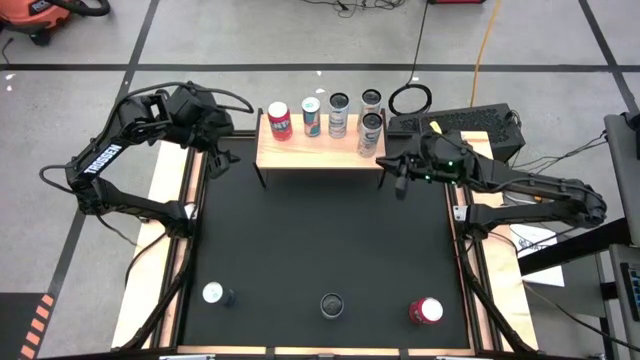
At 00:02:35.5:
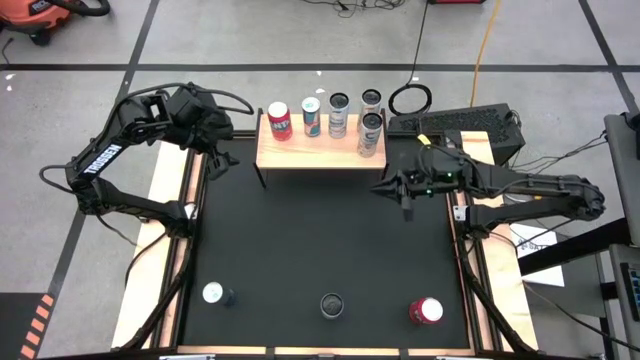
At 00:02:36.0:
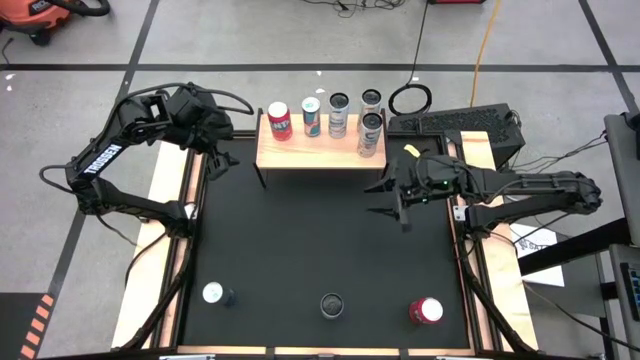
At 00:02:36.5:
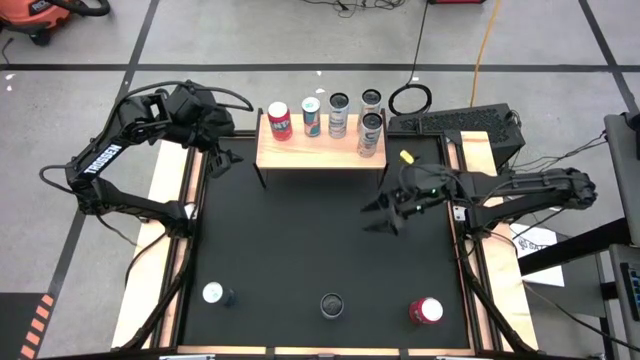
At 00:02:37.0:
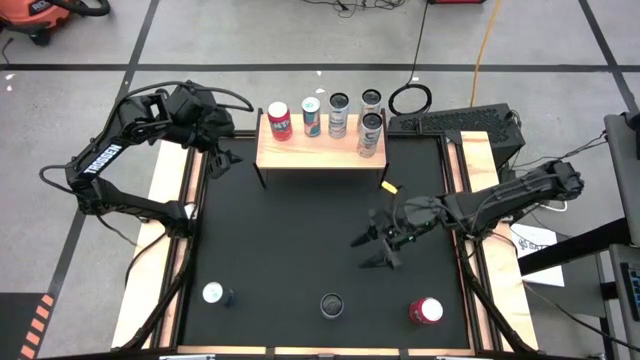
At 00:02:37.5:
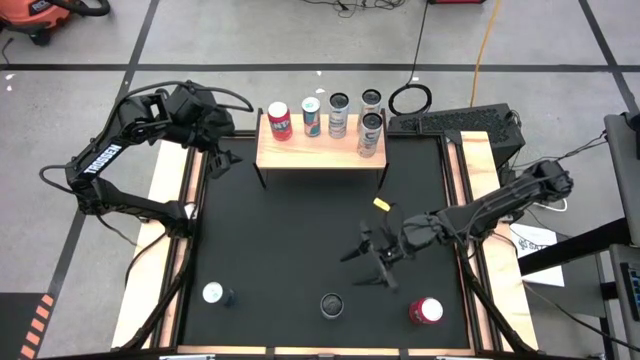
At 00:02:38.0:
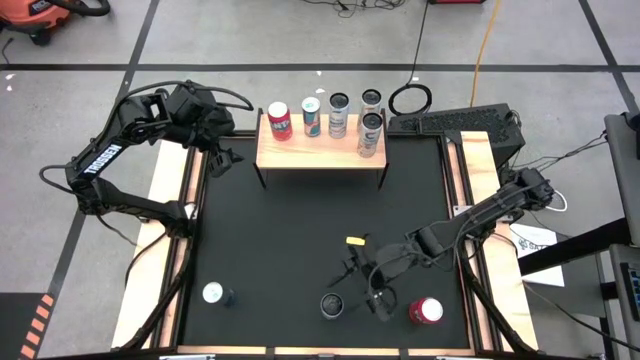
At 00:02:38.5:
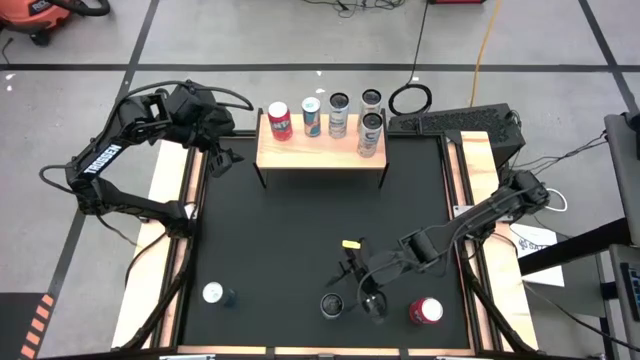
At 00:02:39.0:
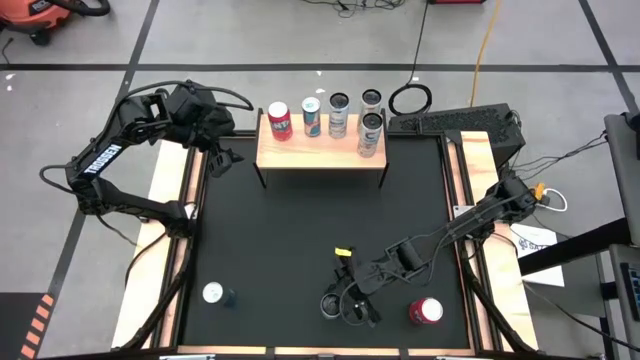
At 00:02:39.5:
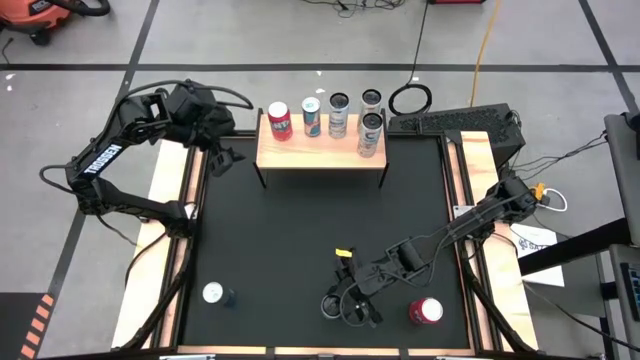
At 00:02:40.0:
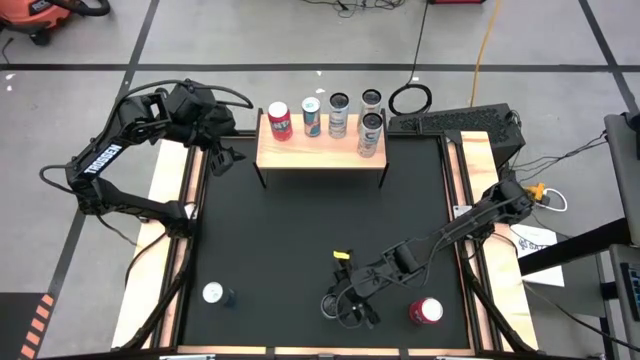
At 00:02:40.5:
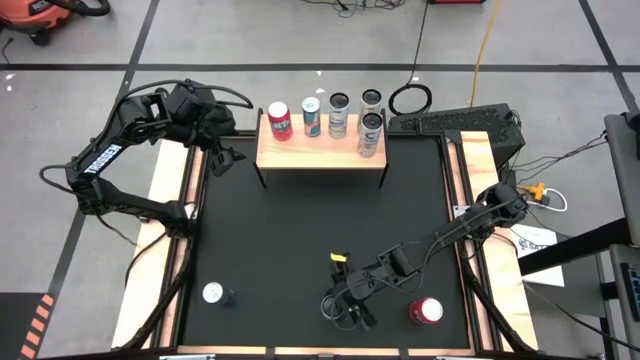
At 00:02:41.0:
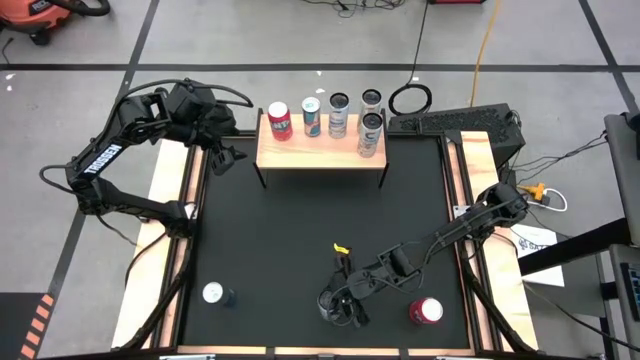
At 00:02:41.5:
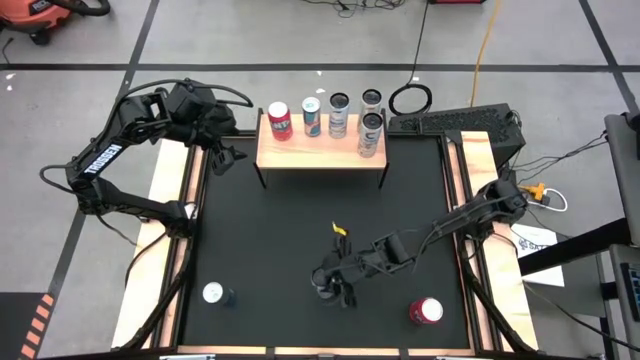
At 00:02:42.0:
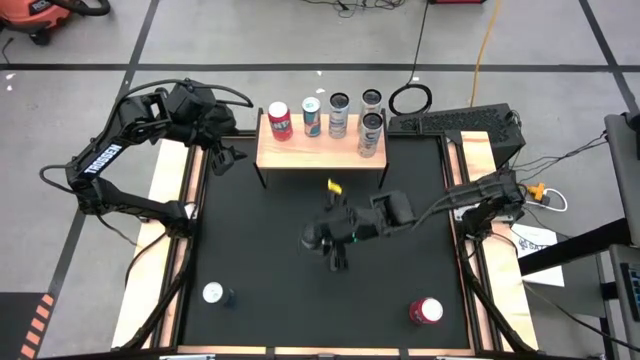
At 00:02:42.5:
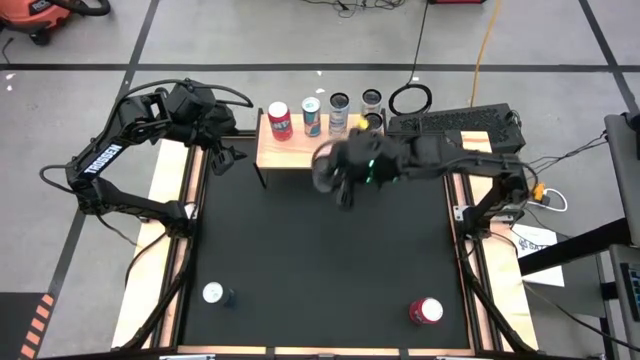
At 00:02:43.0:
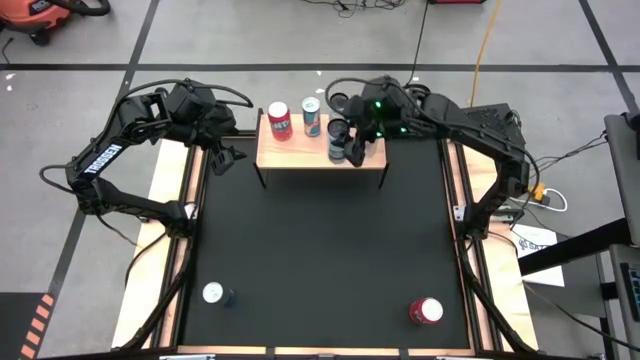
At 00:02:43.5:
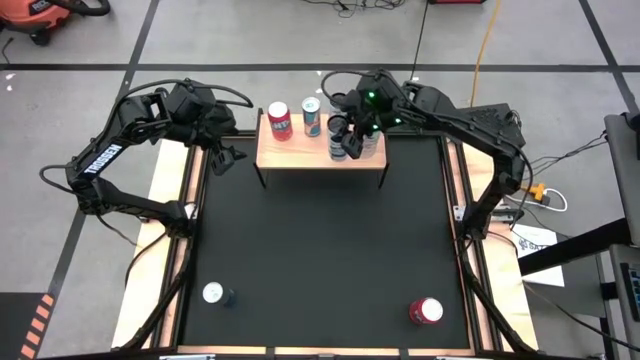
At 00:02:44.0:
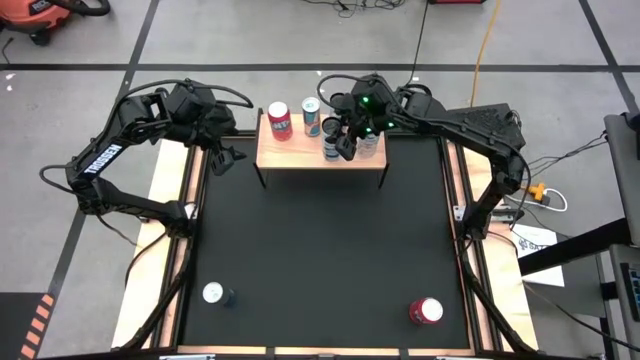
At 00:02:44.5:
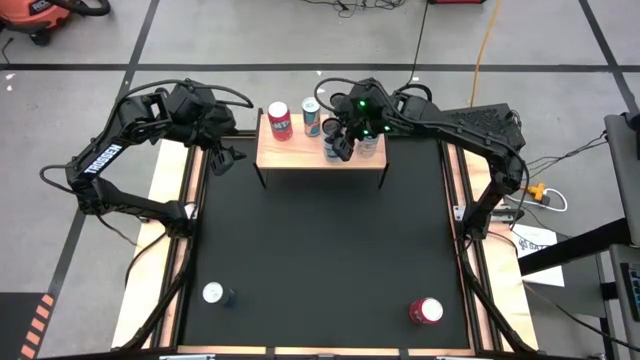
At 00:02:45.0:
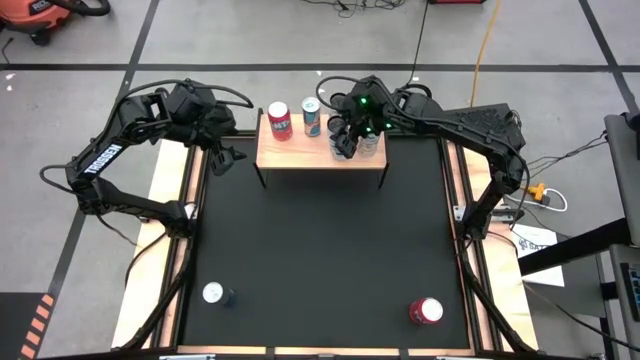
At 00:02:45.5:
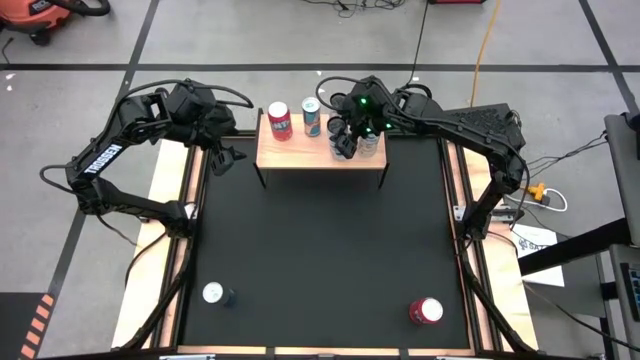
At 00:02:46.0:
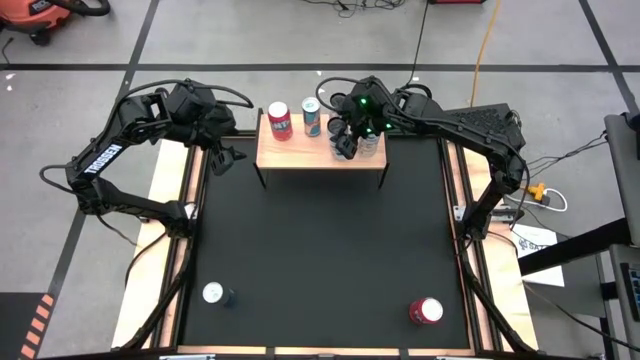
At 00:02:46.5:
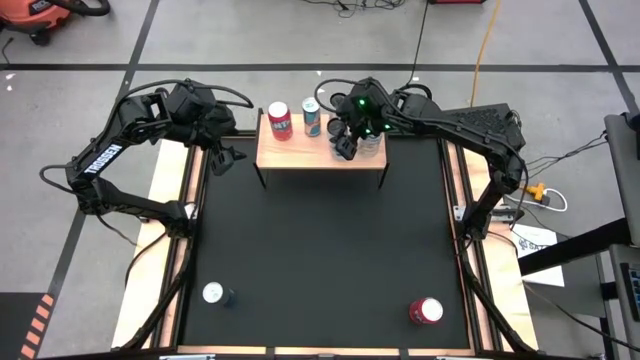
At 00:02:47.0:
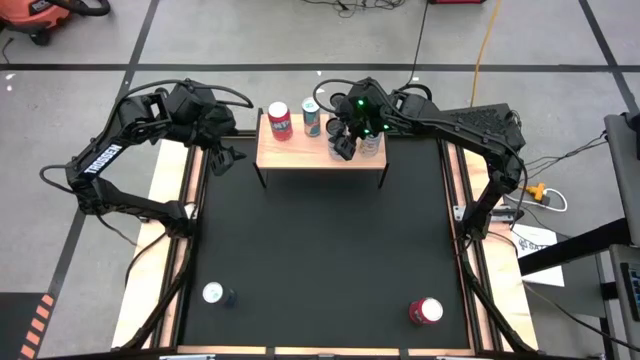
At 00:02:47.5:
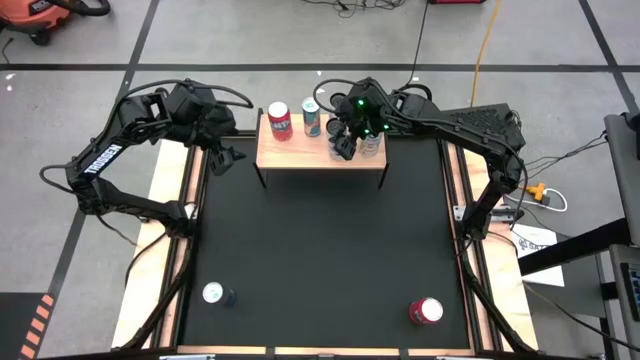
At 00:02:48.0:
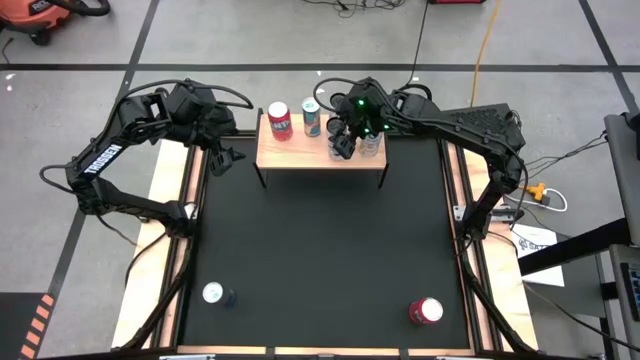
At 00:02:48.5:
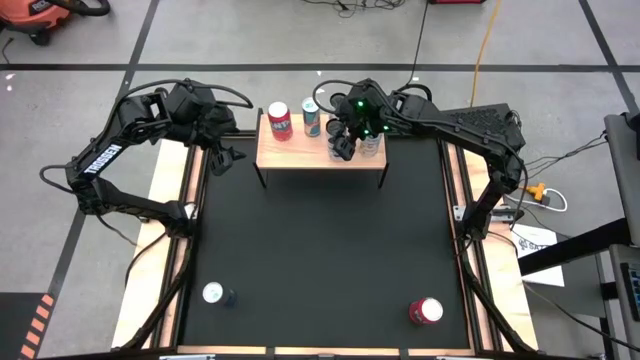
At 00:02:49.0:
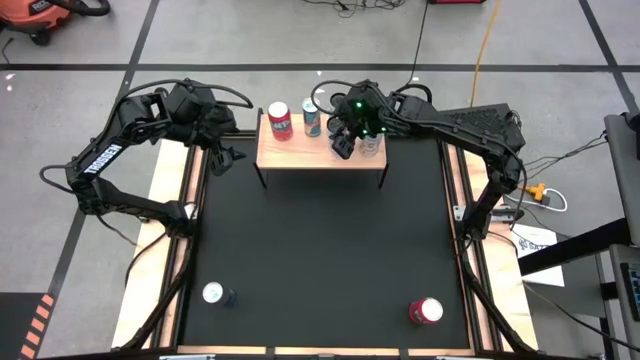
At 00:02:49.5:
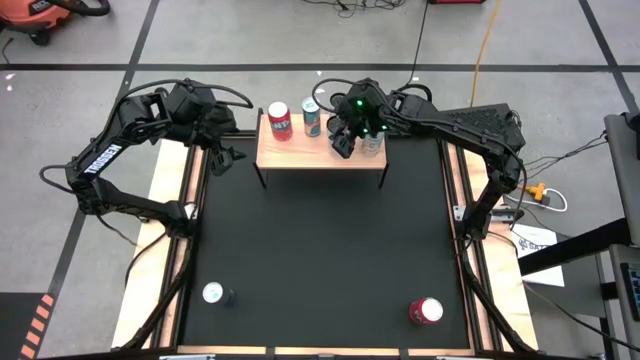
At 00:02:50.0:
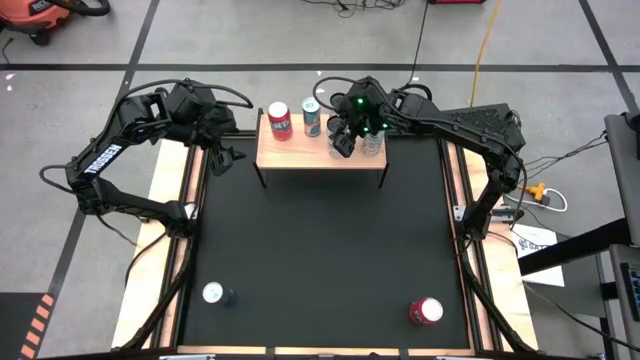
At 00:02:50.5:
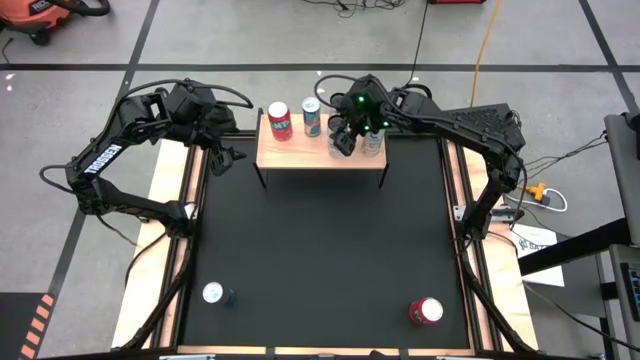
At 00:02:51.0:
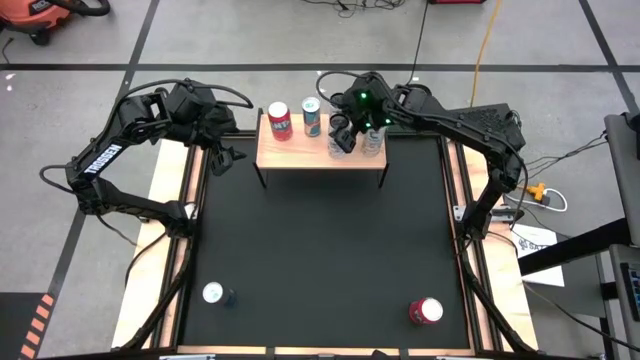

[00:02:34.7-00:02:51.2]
Task: Place canned beverage on shelf
Put the white-blue soda can on the shelf aligned with the other white-blue soda can

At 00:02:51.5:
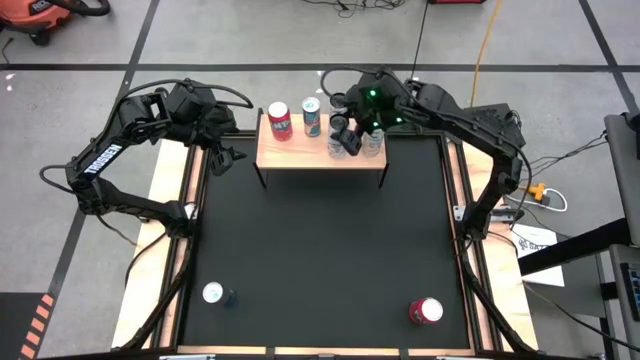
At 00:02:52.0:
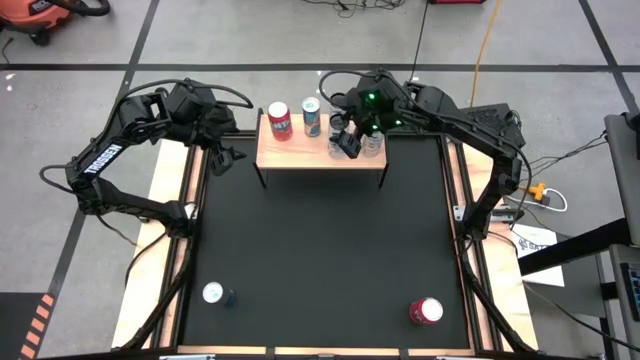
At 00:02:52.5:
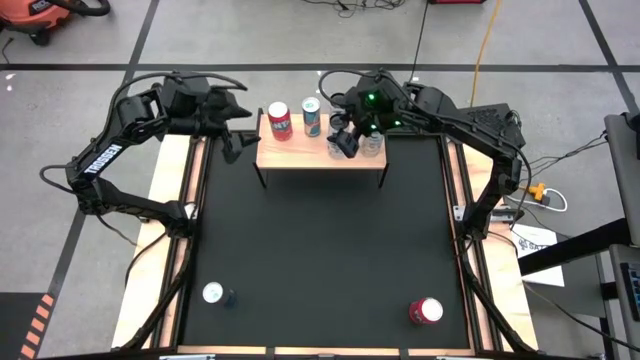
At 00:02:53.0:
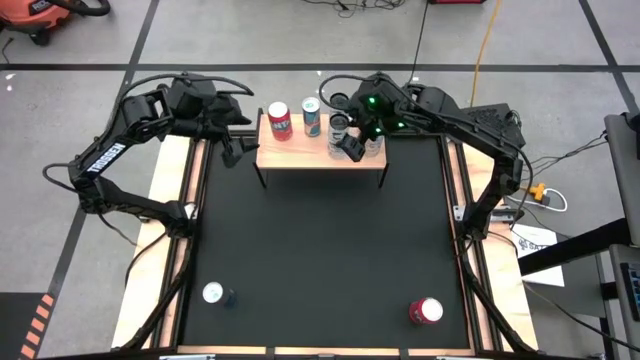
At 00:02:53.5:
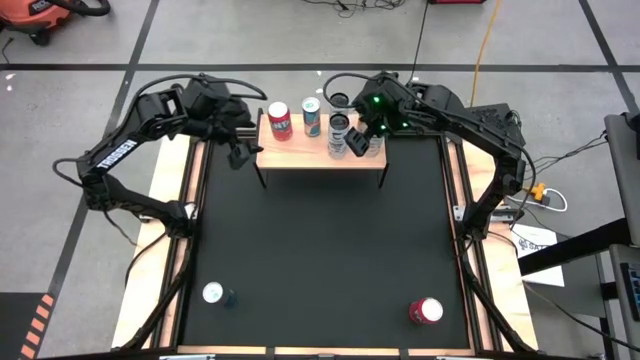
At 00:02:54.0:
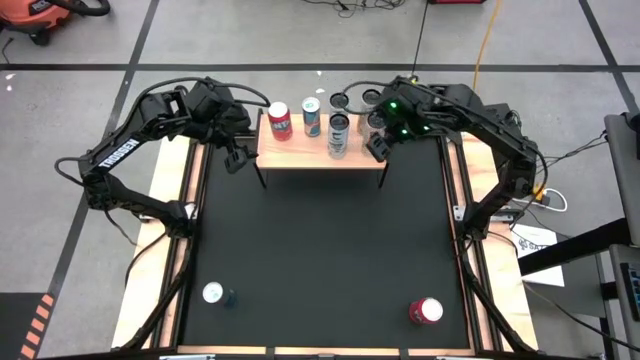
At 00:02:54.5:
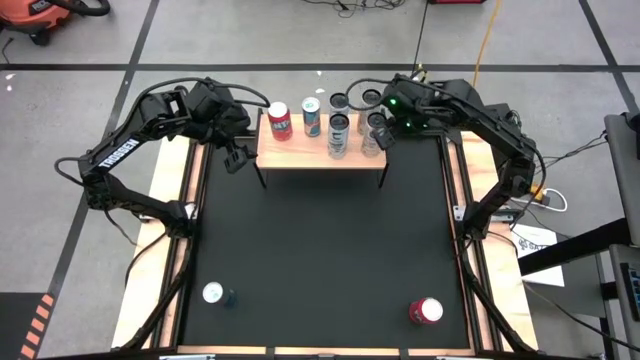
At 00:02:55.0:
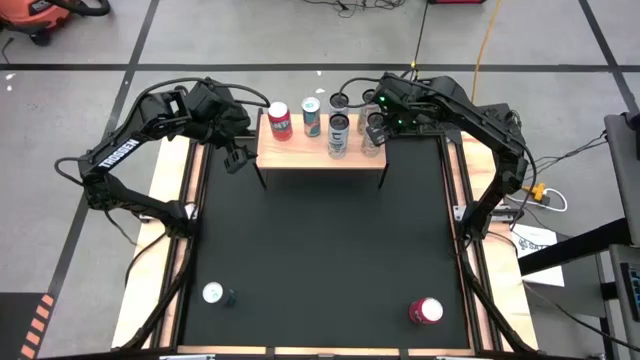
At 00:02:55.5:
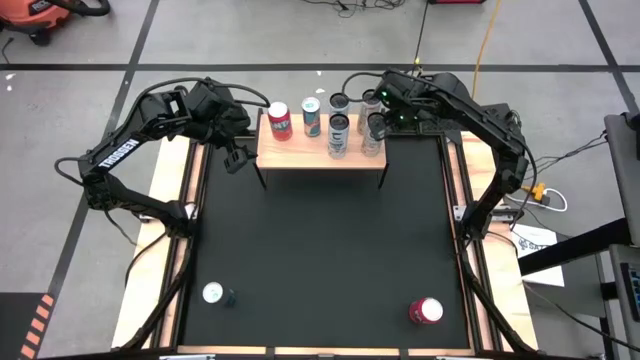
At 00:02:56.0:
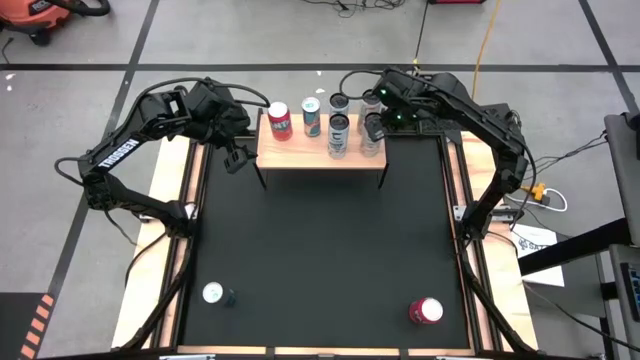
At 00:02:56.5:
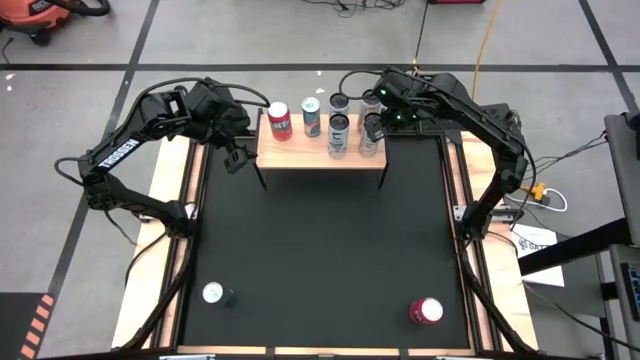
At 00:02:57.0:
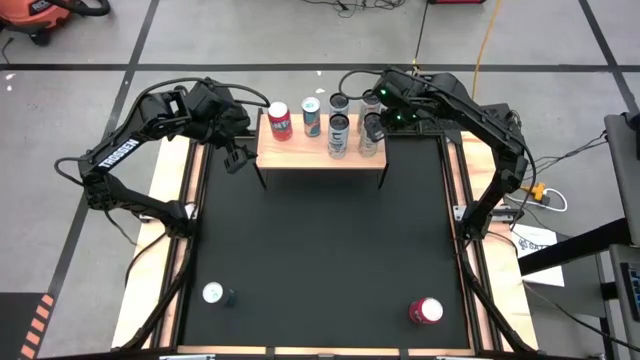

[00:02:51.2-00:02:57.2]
Adjust the white-yellow soda can
